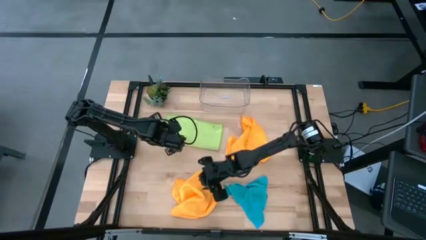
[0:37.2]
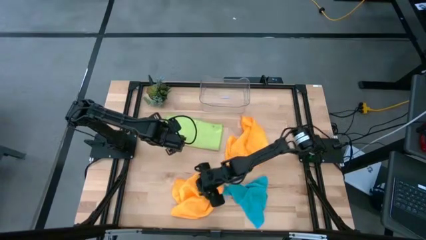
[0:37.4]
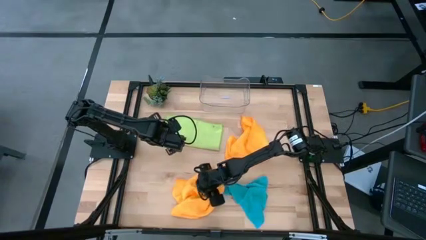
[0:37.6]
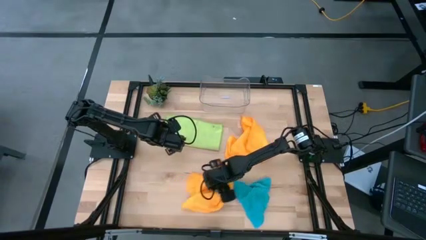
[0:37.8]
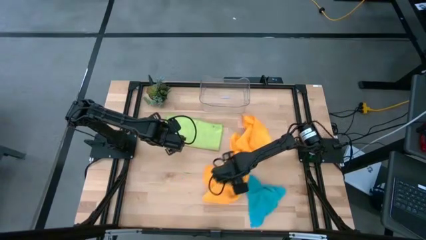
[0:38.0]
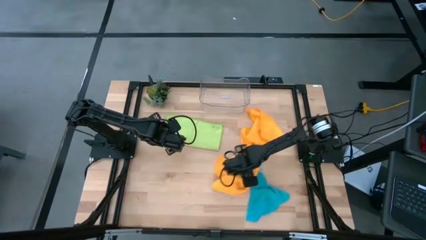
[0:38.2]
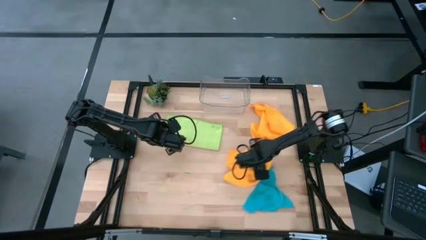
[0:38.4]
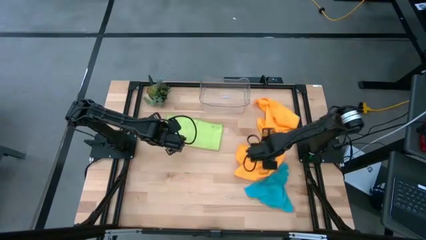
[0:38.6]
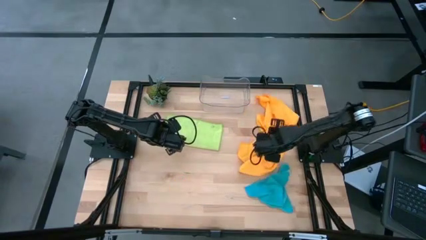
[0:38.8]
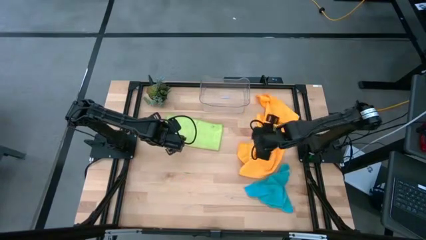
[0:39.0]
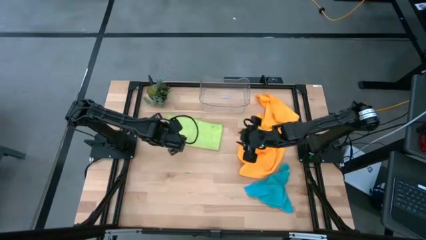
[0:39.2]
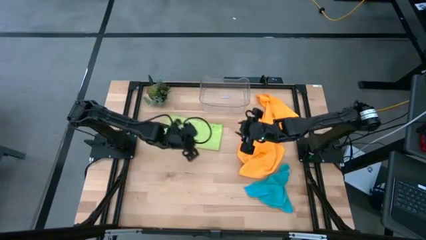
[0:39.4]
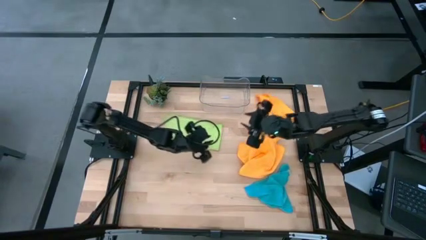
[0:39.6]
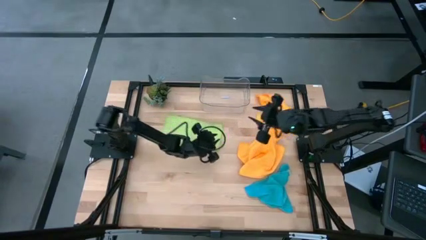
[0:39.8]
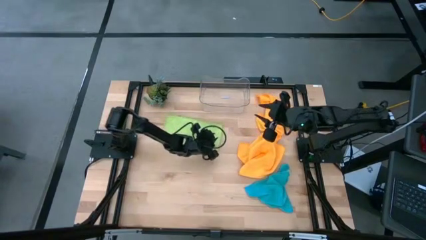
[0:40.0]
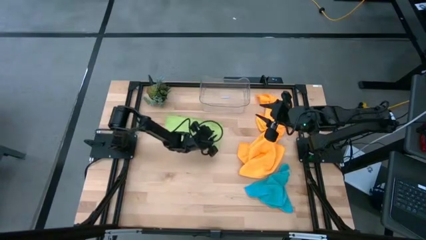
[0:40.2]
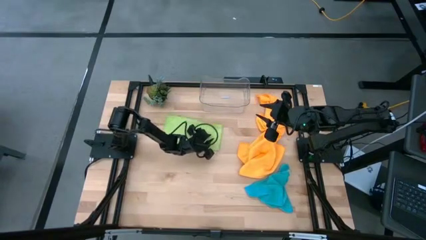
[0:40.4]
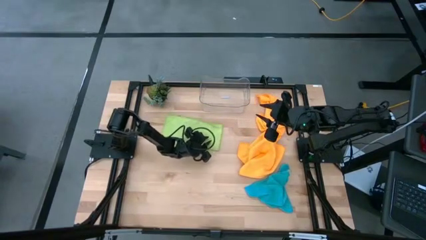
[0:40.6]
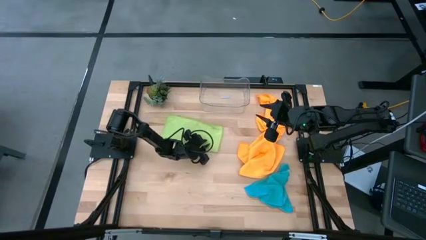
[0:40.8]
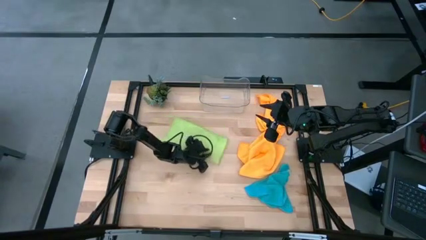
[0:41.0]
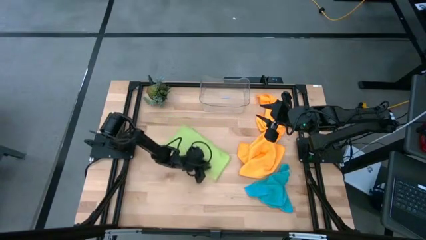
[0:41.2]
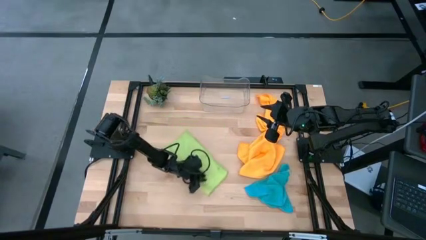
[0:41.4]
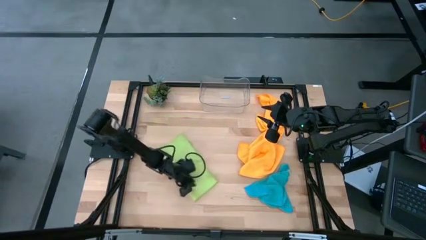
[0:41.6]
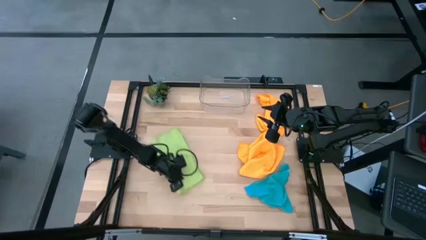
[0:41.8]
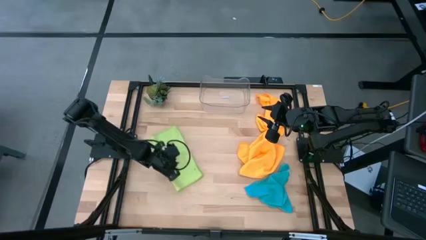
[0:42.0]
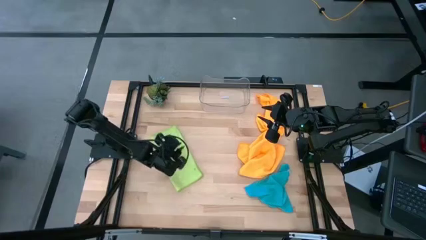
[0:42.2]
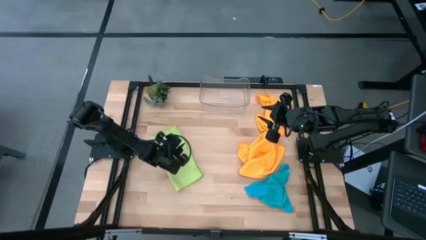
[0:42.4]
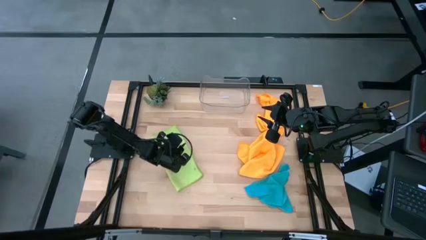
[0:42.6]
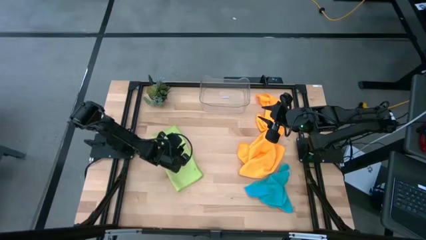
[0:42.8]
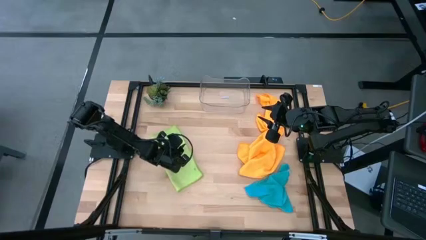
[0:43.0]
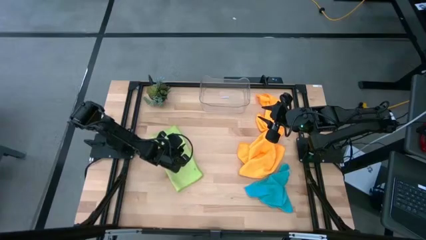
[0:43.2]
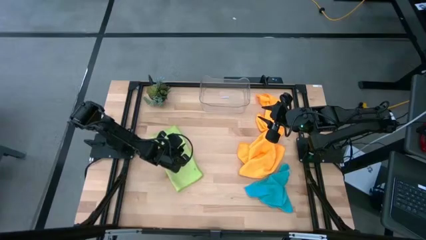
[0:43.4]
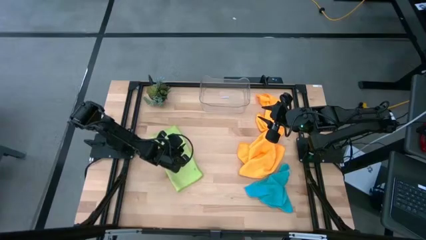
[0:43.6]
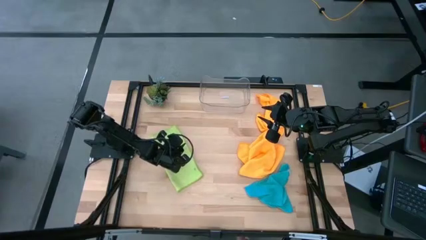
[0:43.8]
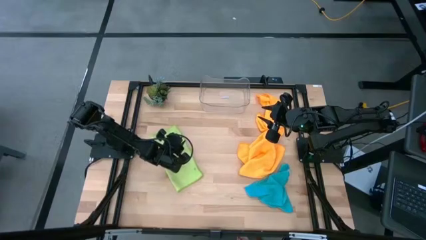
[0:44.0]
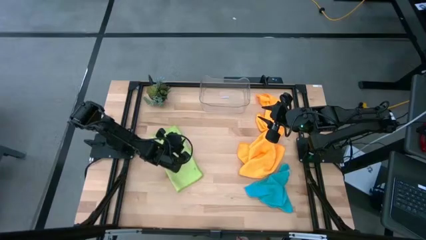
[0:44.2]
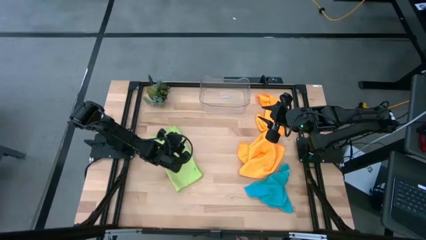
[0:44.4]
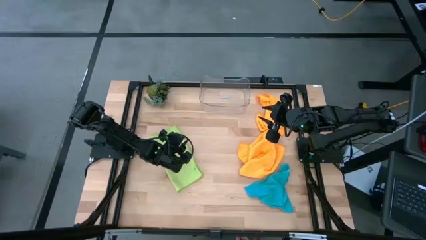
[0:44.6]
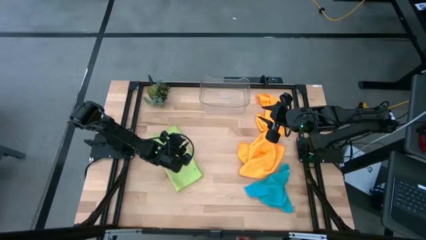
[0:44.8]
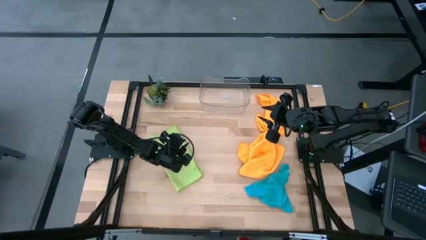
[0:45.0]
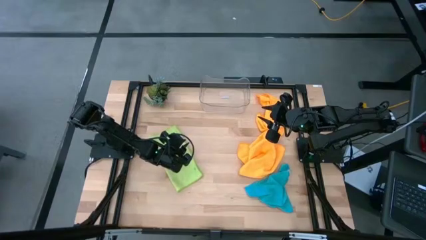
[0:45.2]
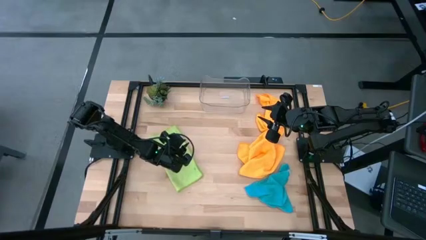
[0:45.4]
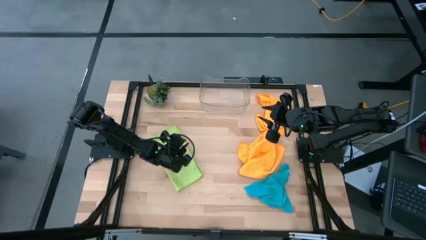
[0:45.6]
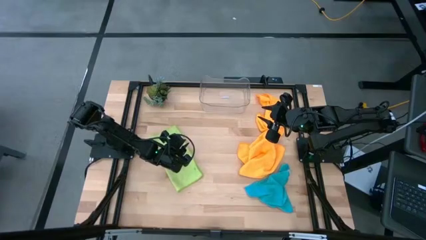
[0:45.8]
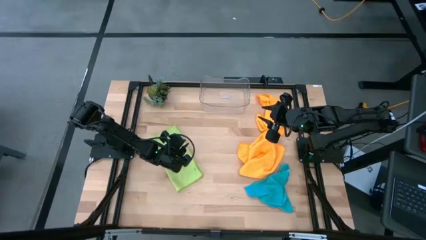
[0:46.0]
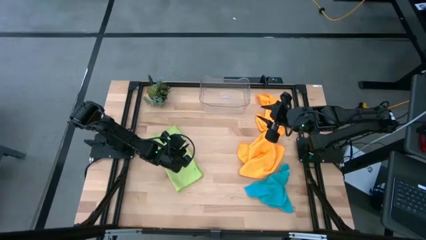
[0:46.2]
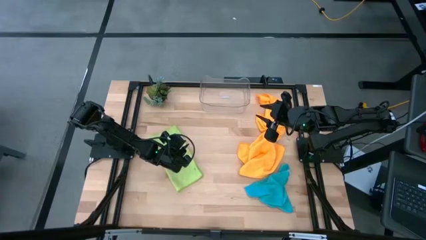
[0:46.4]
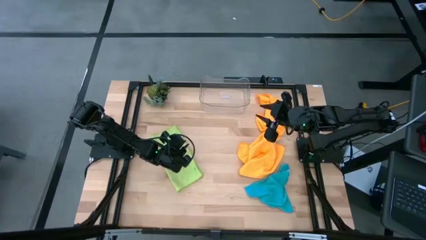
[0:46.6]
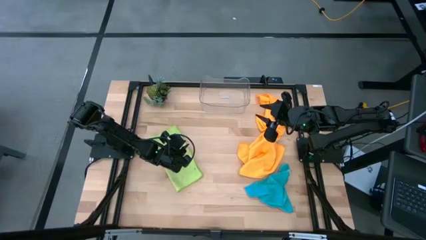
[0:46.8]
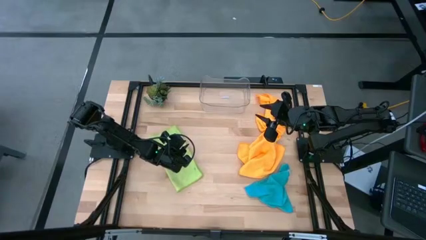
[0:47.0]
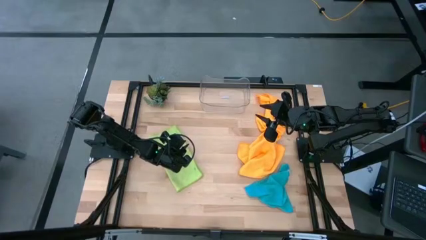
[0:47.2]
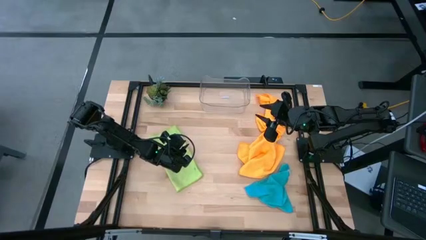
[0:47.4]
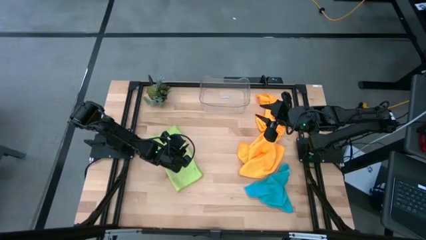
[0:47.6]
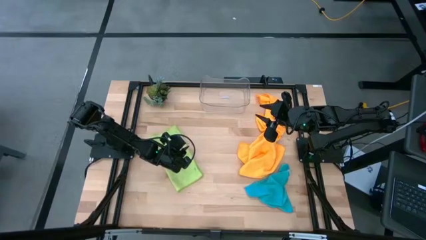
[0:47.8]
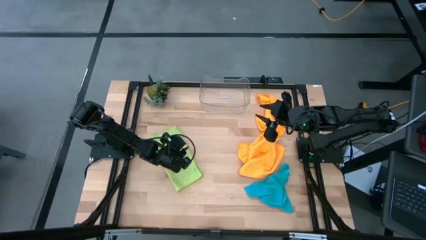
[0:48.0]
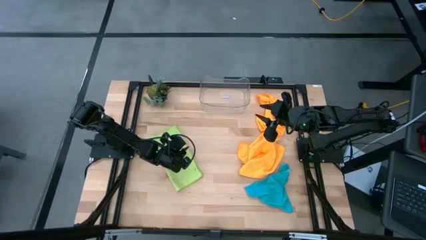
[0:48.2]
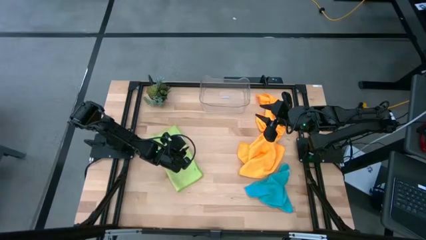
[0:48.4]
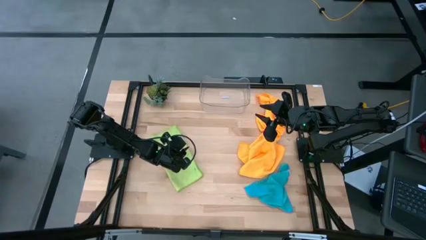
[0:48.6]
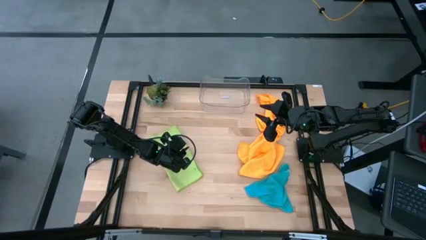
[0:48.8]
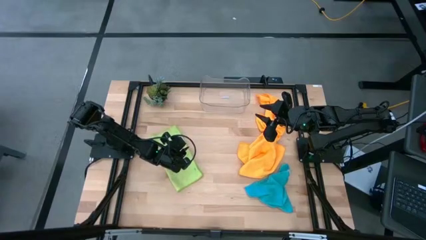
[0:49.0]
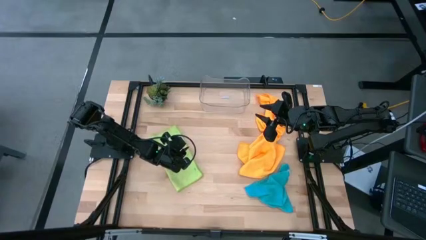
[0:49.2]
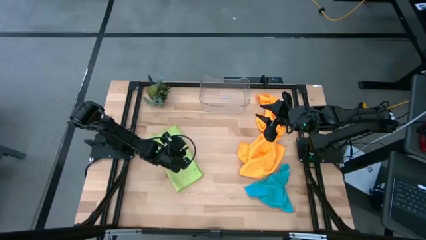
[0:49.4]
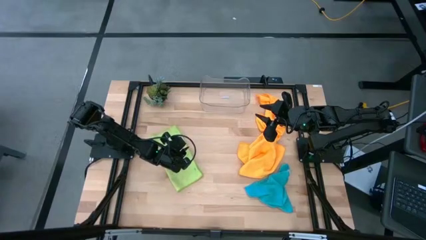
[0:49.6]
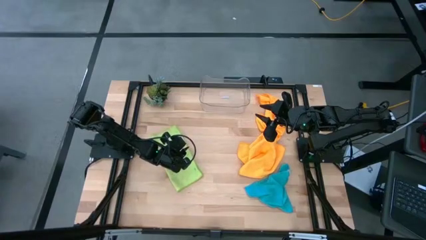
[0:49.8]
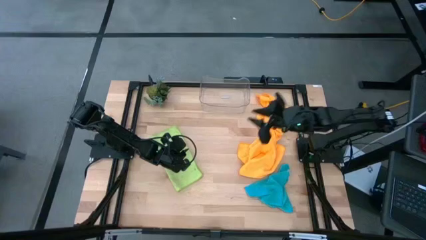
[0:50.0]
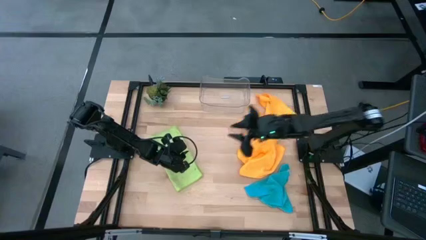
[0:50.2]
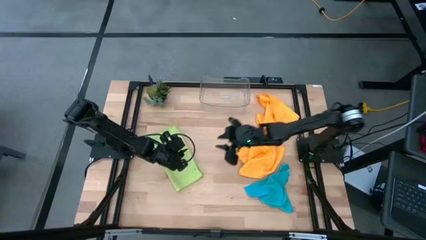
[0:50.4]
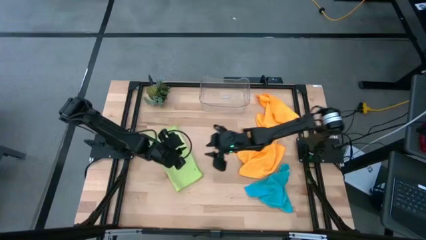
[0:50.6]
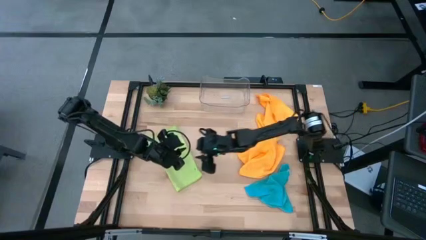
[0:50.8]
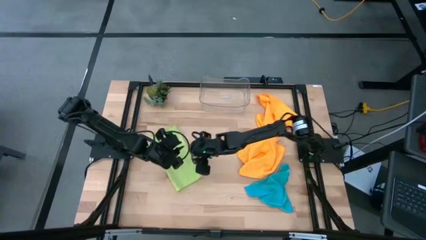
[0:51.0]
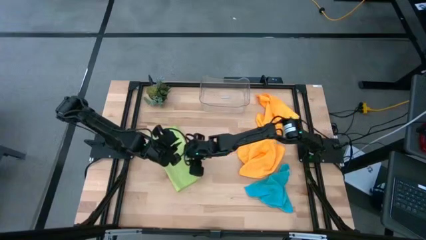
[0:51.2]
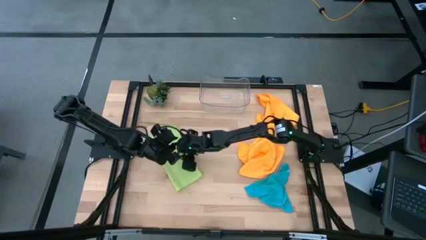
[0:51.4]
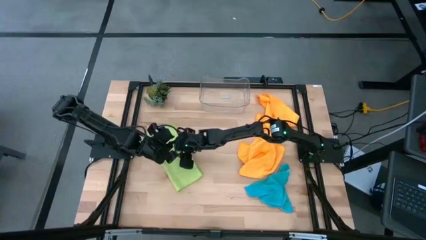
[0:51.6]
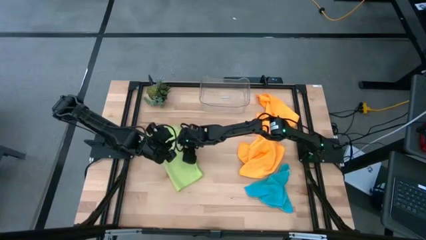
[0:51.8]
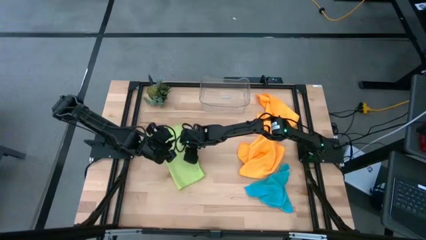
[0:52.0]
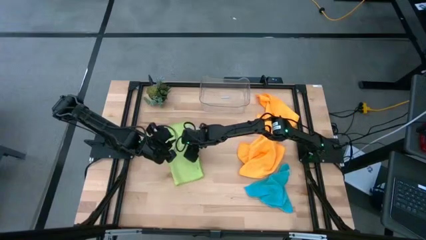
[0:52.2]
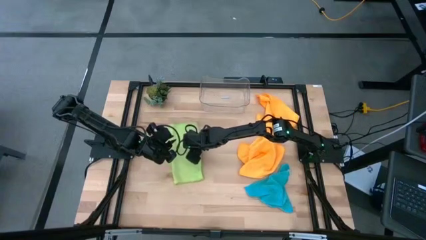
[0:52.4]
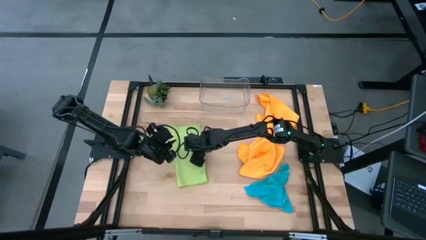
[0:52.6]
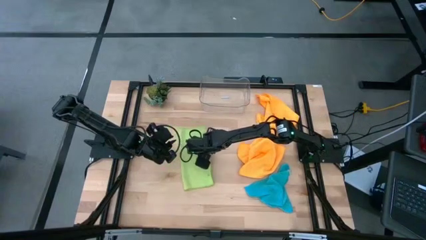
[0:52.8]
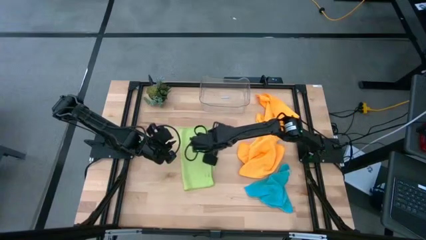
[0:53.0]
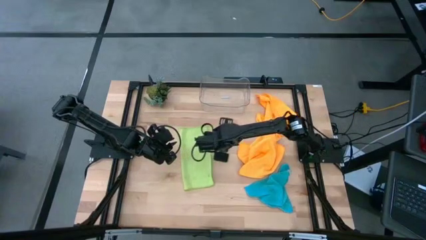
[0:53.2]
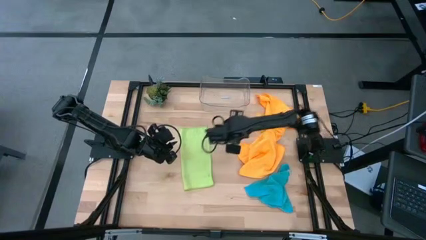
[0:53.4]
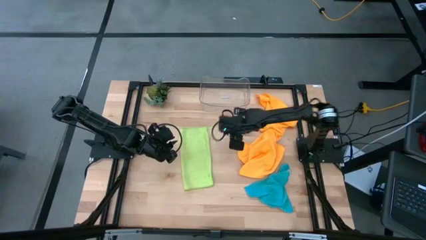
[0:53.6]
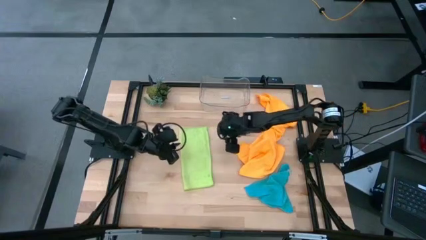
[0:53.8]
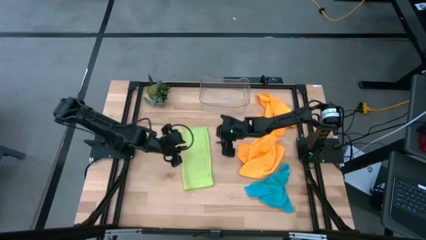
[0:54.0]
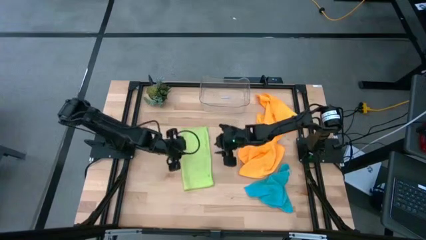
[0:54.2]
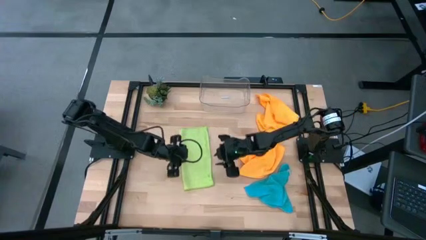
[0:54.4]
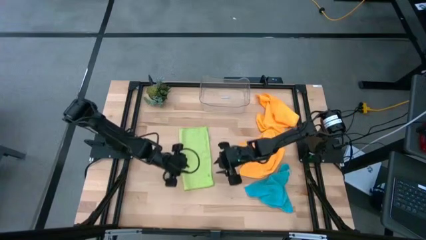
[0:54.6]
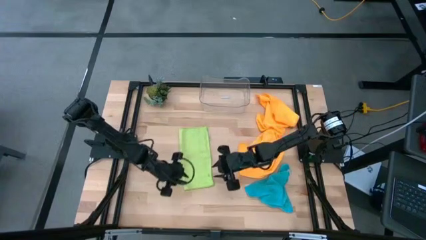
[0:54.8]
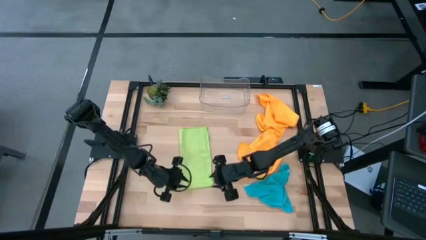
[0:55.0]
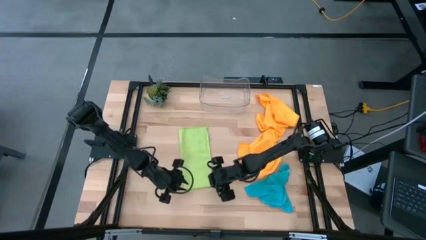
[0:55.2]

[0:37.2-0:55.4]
Task: Fold microfiber towels
Fold the green microfiber cloth
